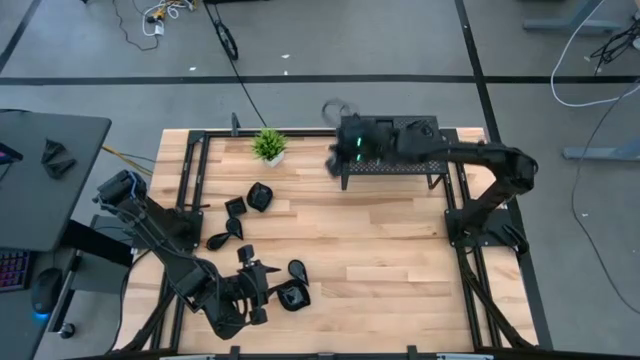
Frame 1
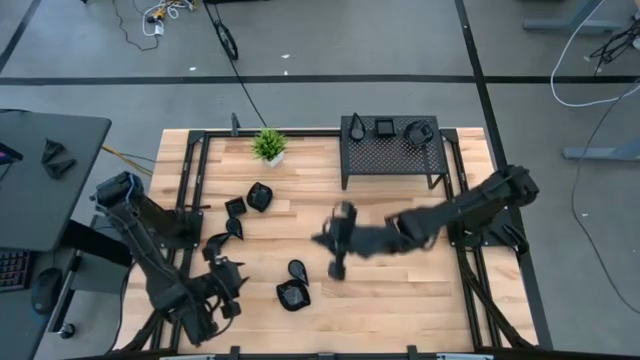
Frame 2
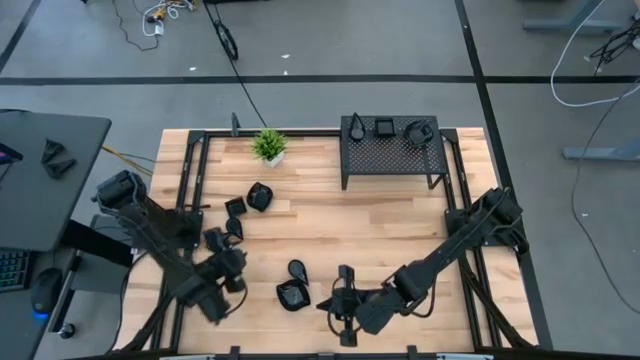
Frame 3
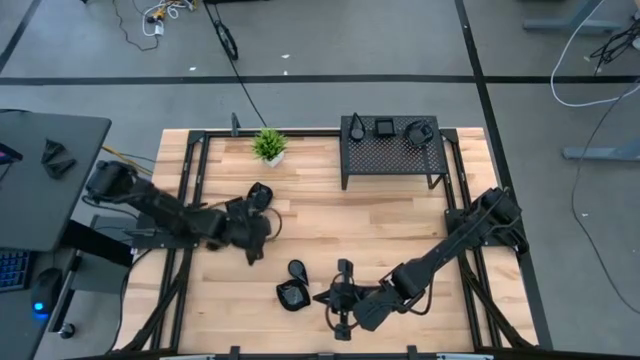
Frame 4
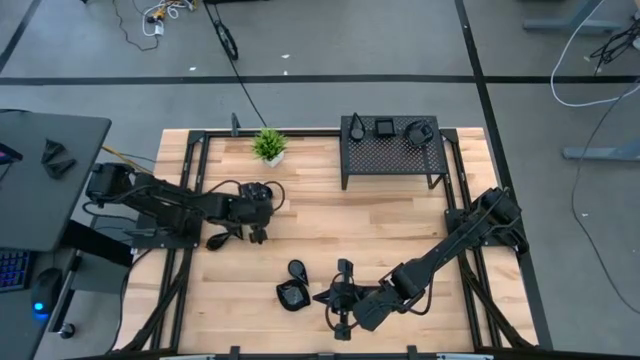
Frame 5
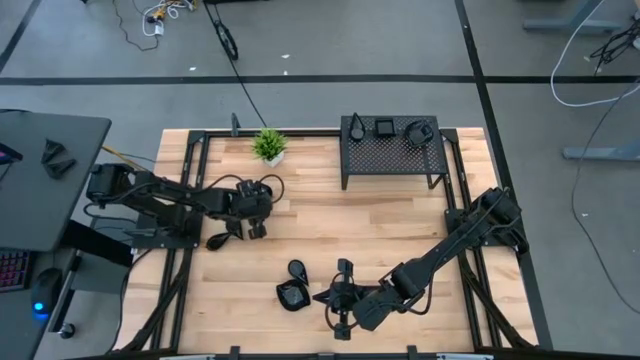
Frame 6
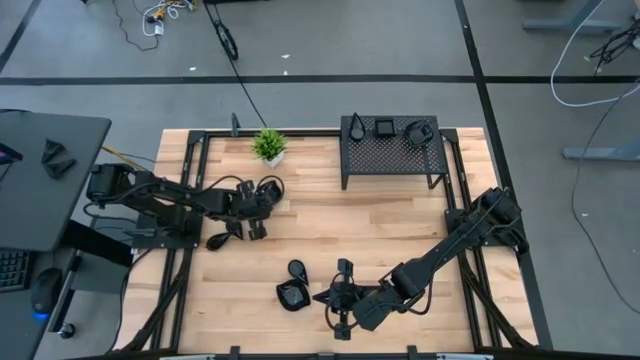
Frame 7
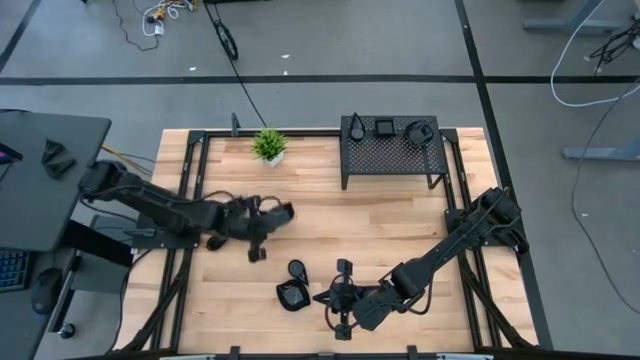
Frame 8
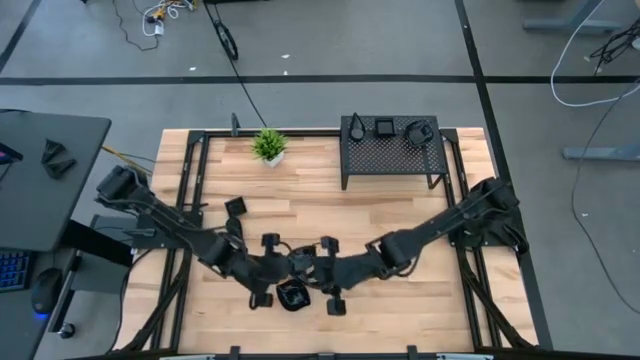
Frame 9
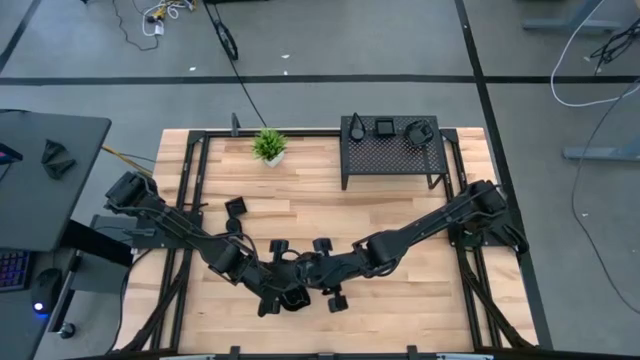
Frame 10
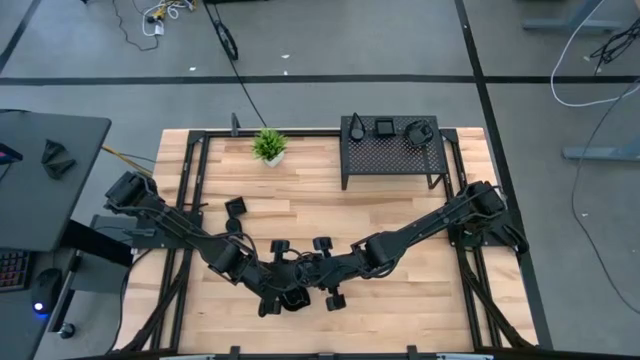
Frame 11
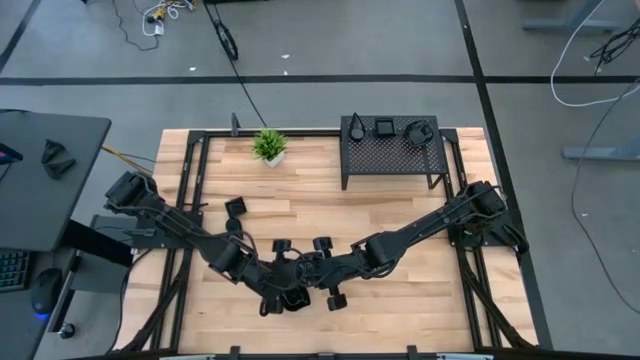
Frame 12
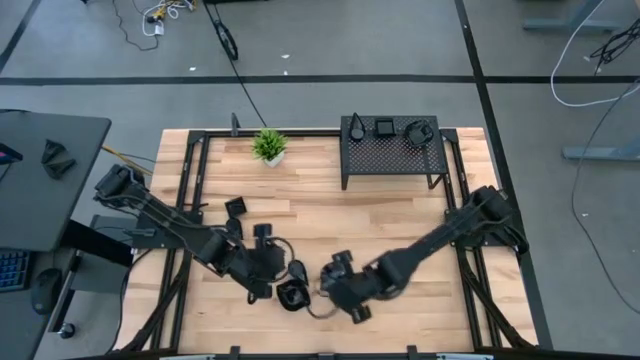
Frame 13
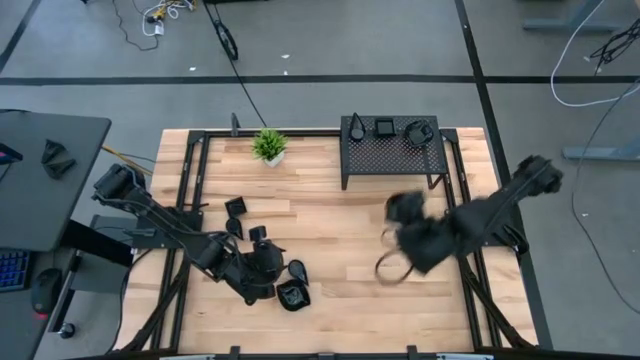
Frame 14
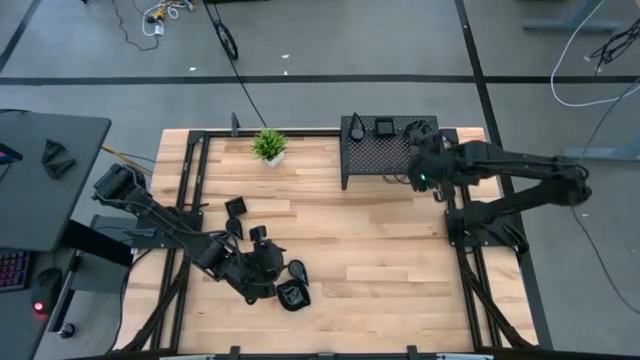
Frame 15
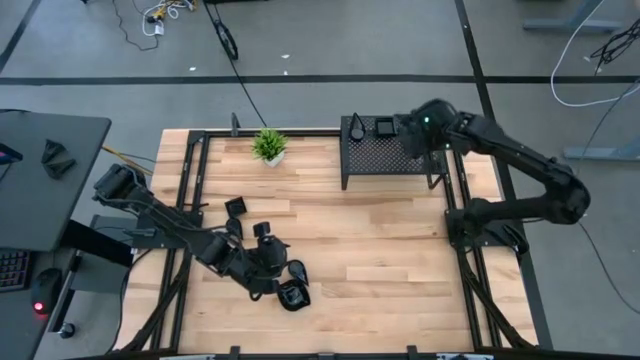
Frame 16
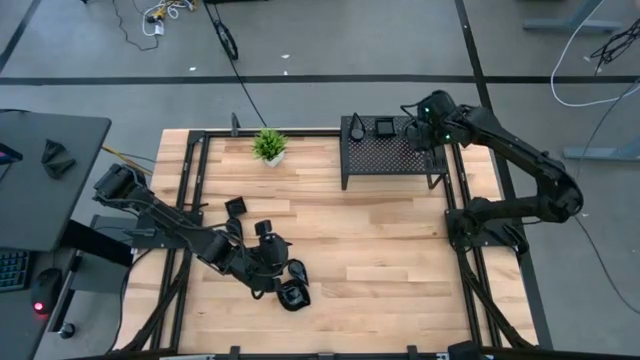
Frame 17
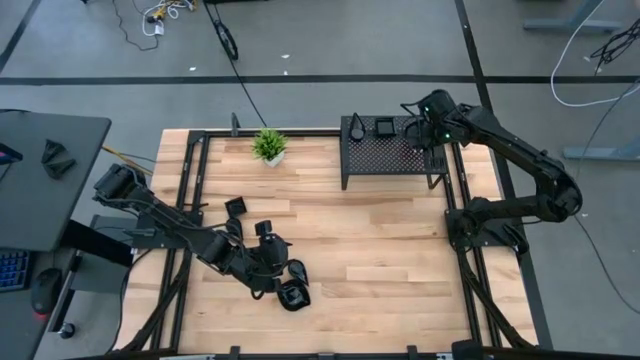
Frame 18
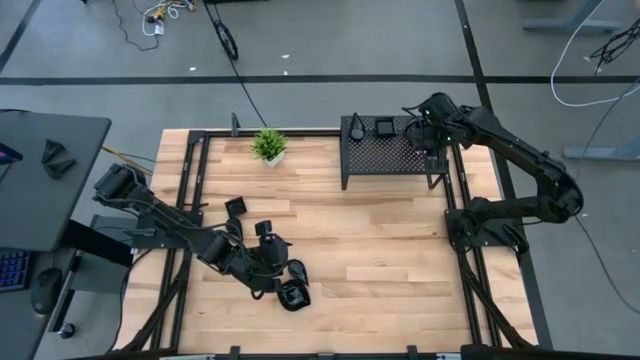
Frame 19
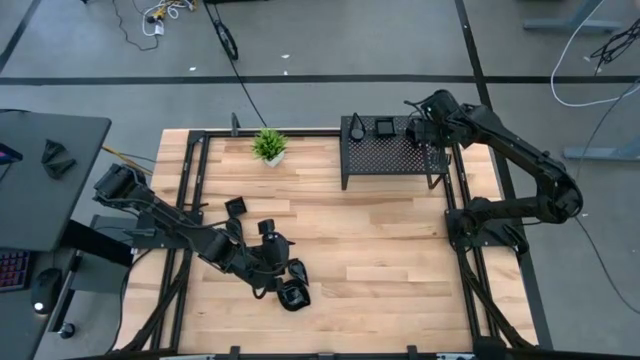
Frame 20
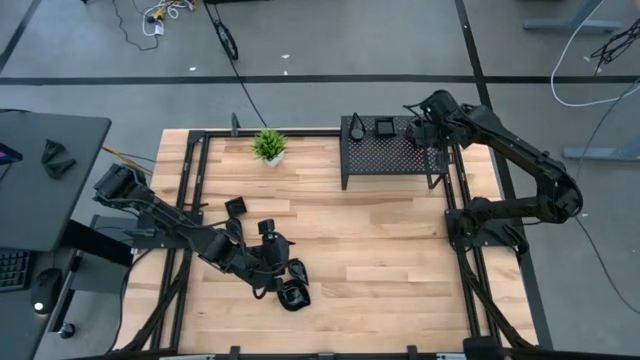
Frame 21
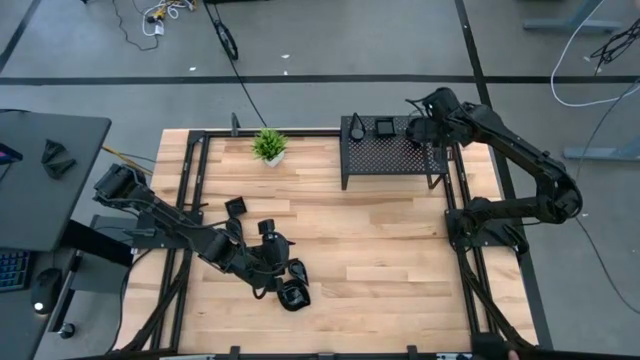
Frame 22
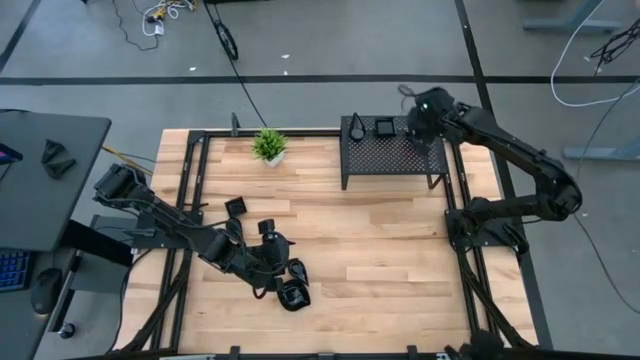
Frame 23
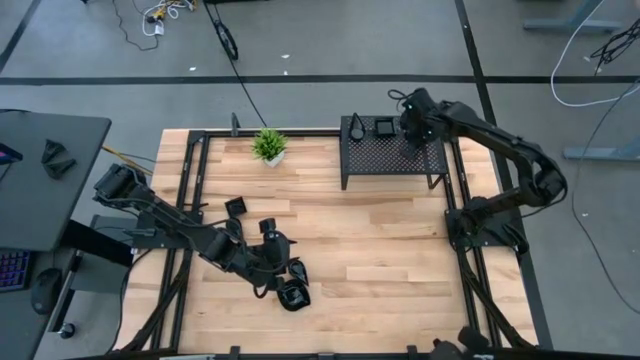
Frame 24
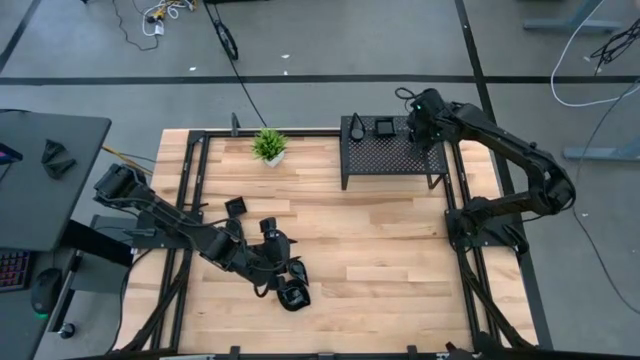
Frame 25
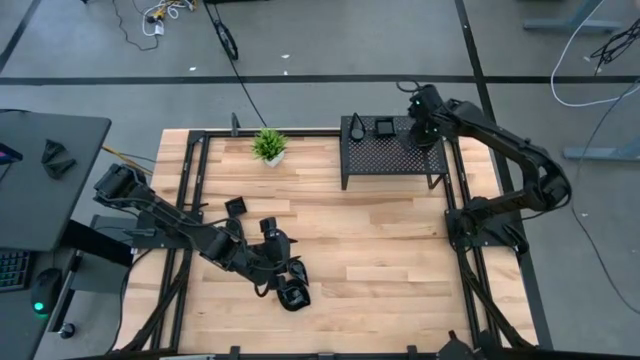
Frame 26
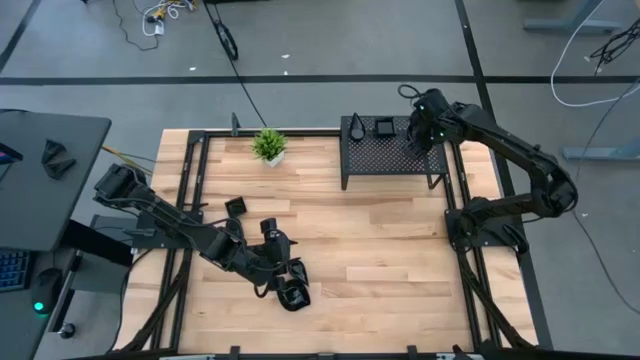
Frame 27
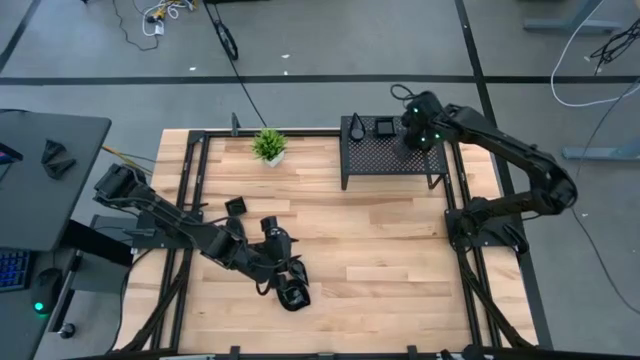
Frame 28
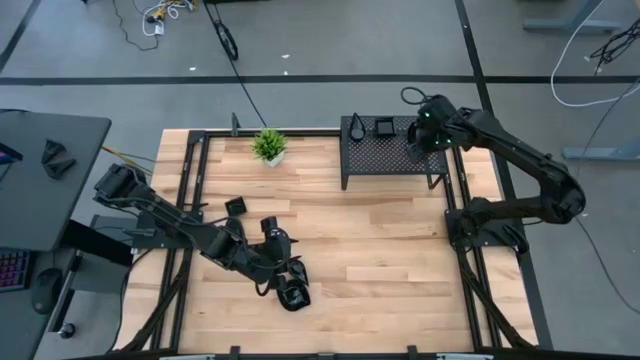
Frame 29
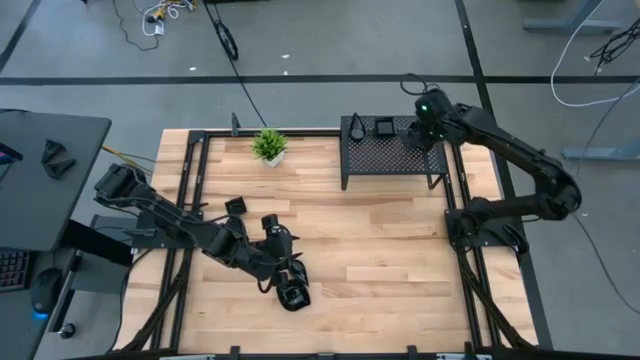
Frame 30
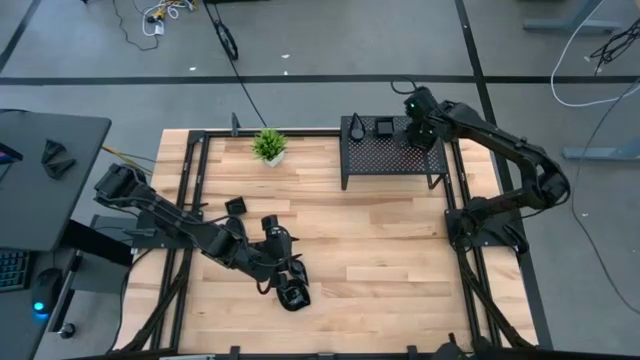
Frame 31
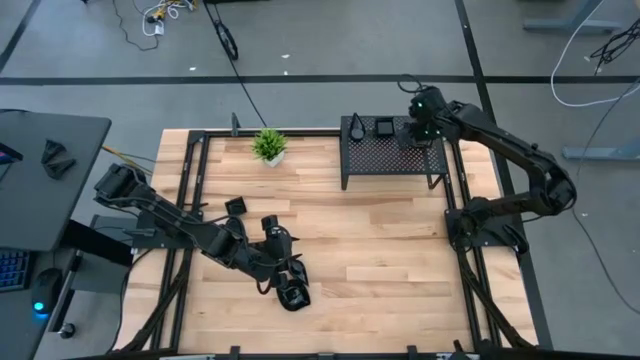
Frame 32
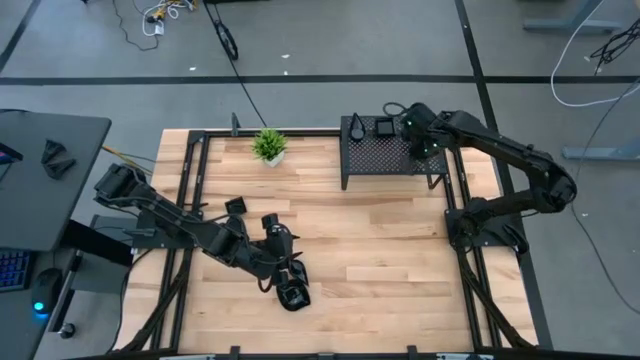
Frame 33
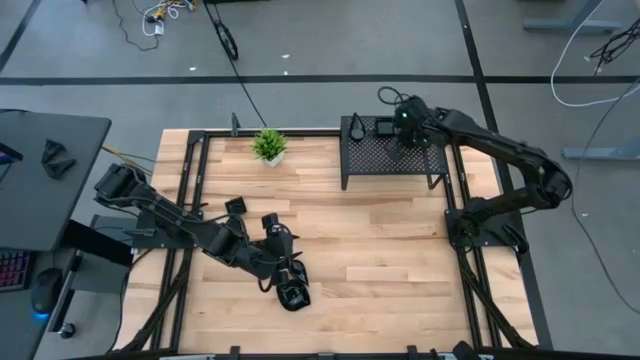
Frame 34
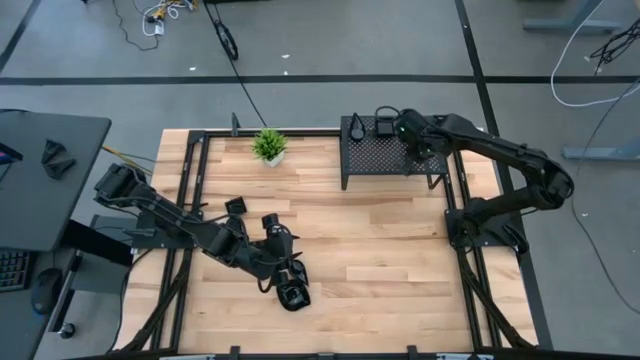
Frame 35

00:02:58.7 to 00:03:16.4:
Task: Pick & Place Mini shaped plates
Stack the black leaf-shaped plate on top of the black leaf-shaped plate on the shelf

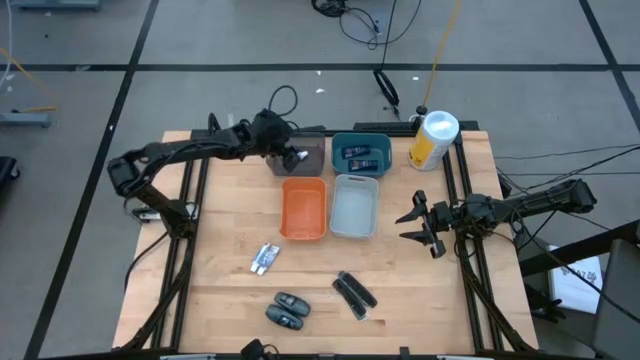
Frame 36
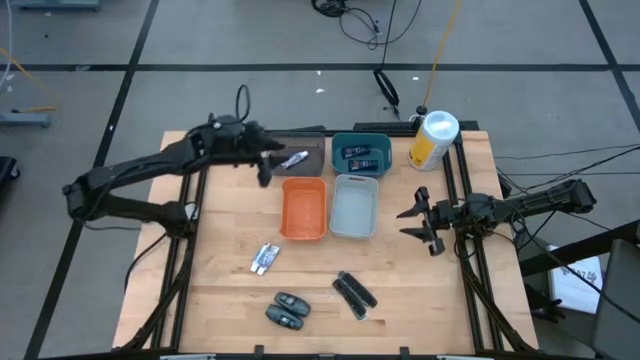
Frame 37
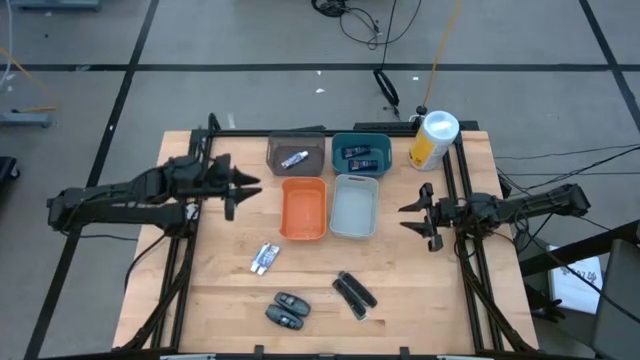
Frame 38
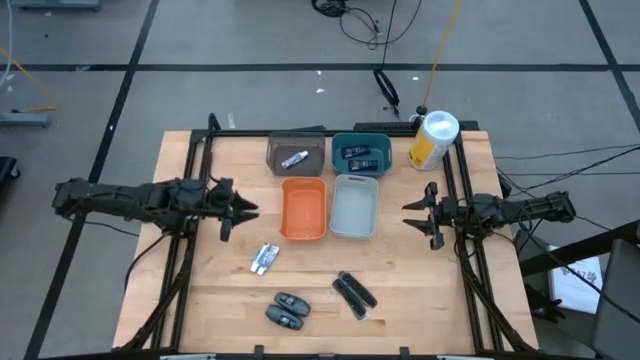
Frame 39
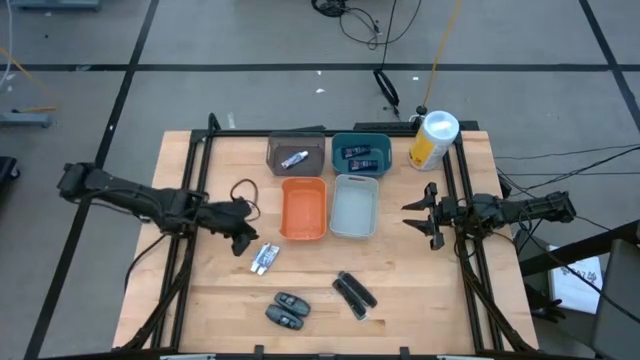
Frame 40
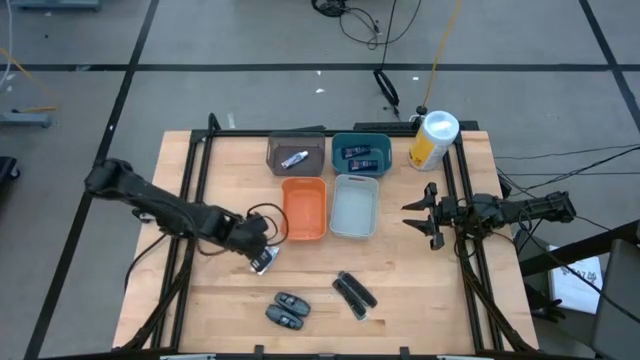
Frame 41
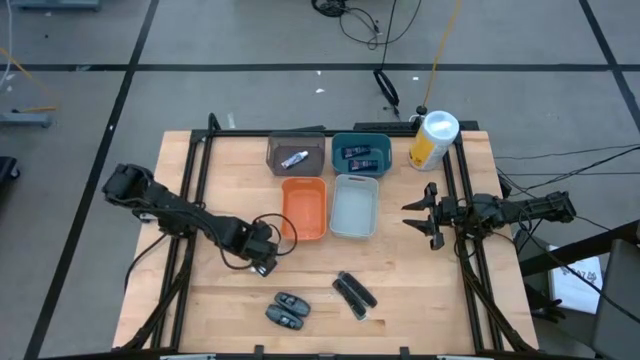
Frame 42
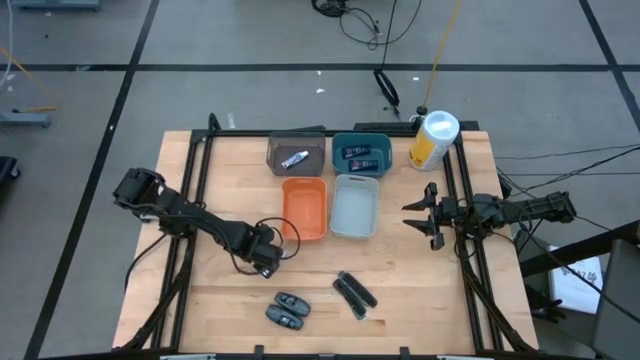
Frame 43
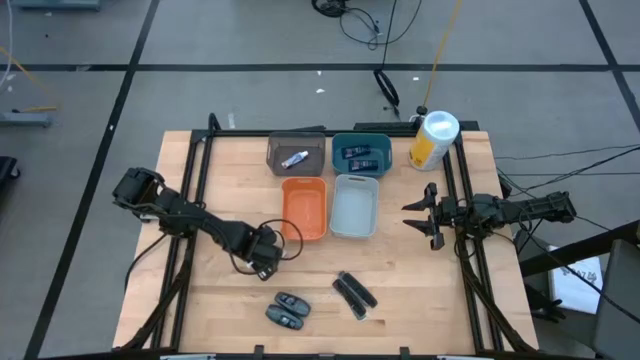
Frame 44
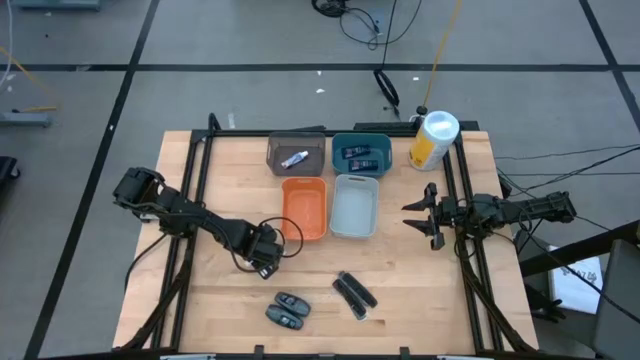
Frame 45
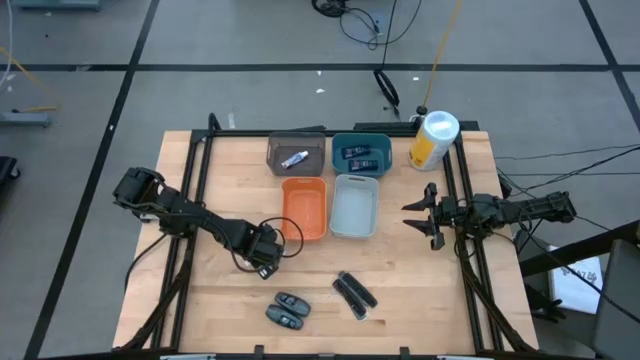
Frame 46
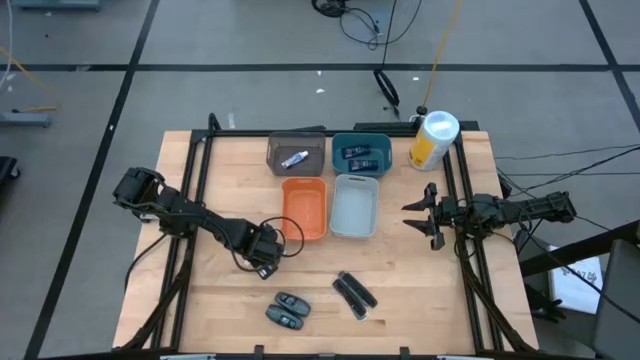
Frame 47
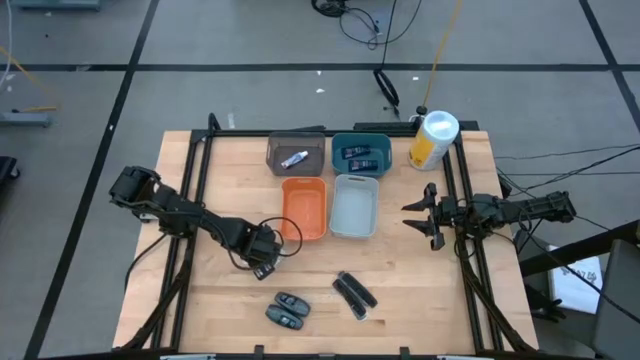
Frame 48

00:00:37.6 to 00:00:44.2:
Task: Pick & Place Travel size toiletries
Put the left white toothpaste into the black transparent bin
